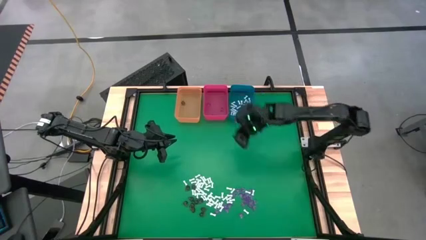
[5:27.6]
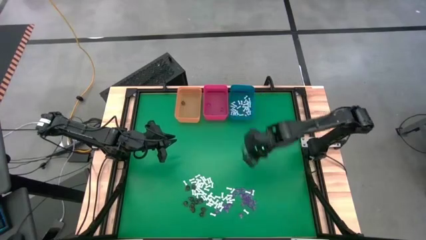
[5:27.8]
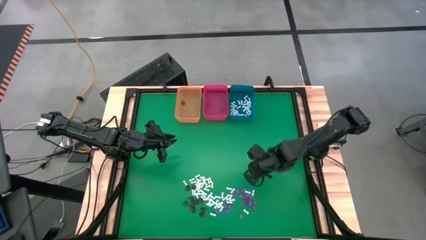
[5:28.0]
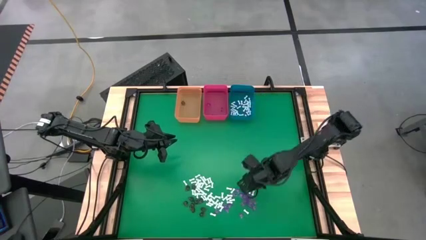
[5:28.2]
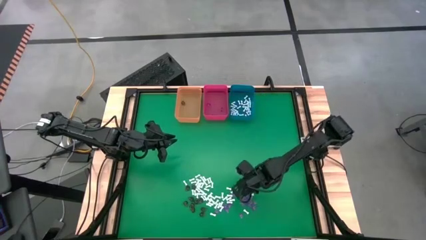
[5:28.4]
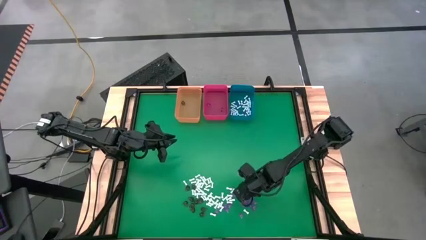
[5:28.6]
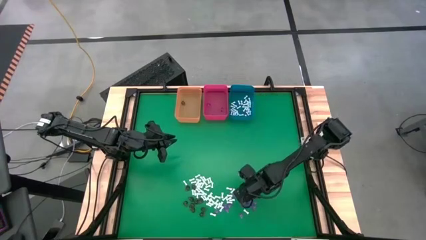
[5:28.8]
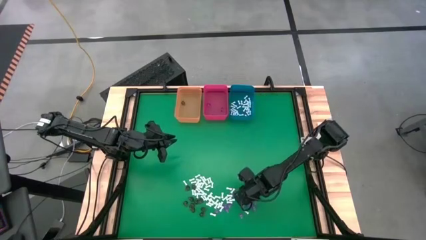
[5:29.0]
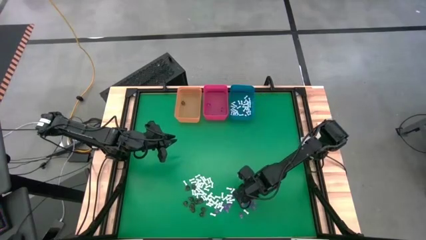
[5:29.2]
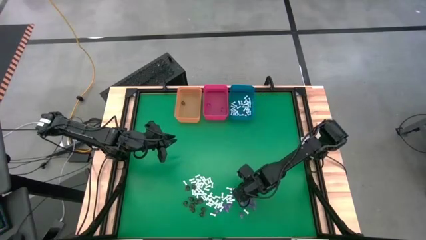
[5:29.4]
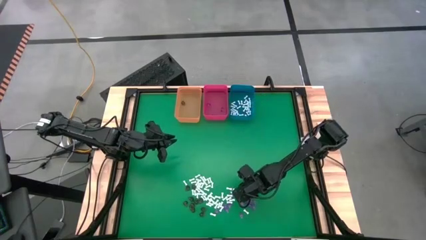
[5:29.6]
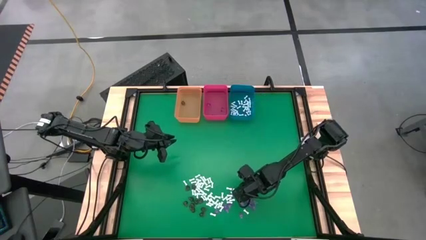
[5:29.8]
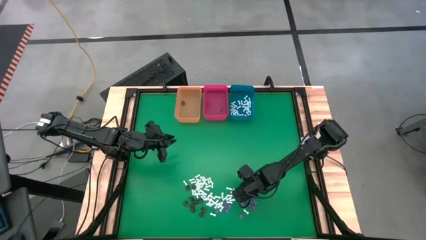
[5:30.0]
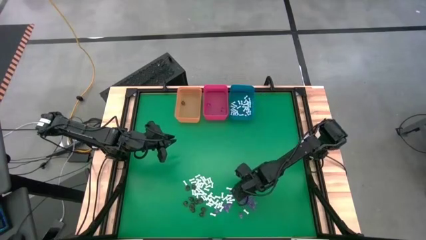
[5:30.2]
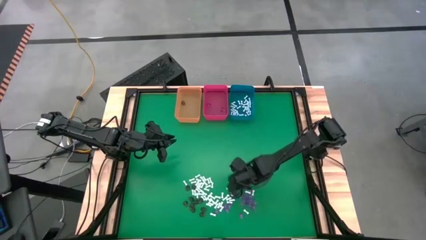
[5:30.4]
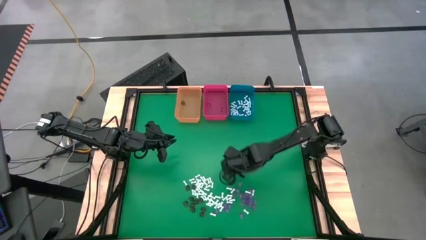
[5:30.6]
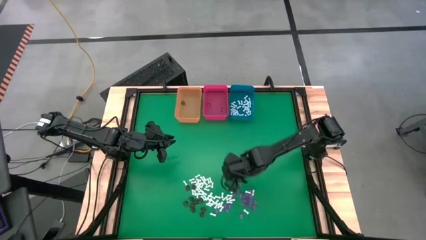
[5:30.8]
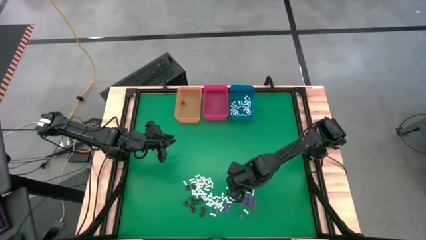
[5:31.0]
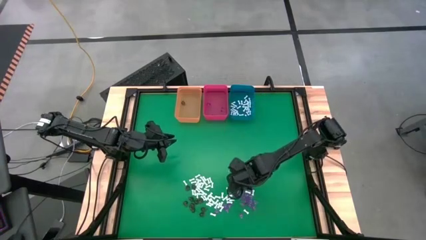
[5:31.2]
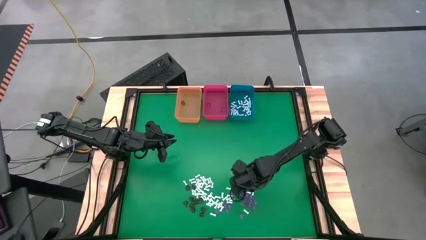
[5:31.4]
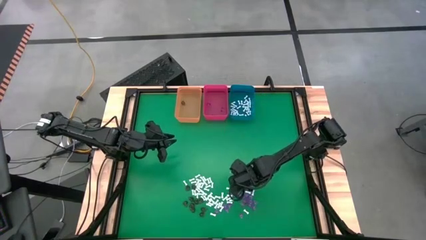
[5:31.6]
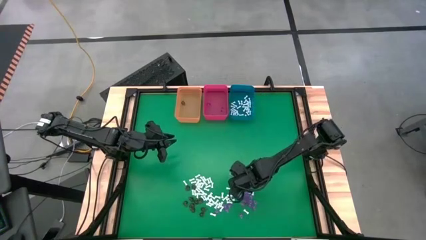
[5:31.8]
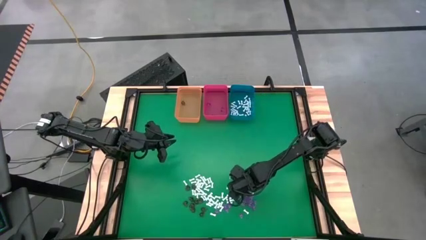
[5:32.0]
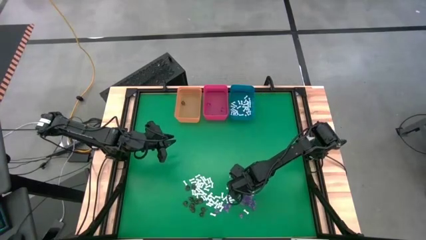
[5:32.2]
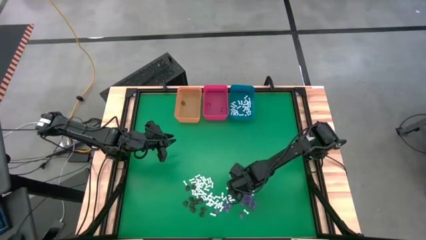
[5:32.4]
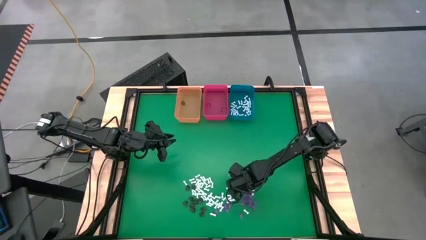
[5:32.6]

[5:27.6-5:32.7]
Task: Sort Halloween decoration
Put the violet witch hat toy into the red bin

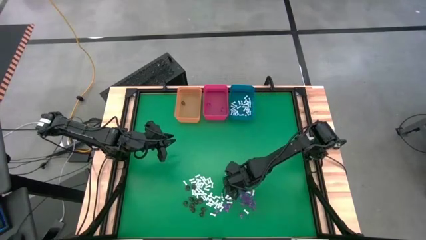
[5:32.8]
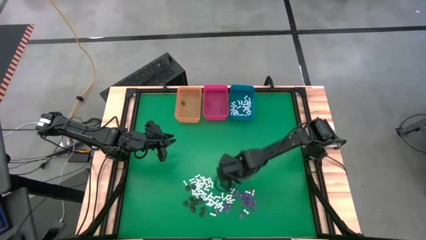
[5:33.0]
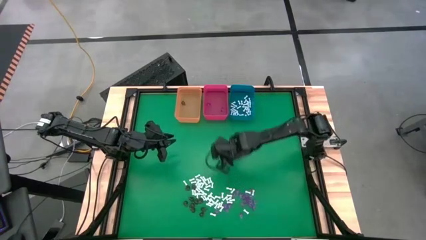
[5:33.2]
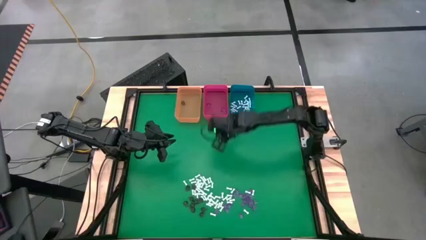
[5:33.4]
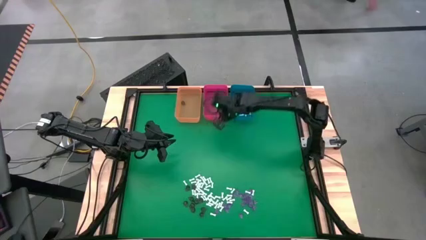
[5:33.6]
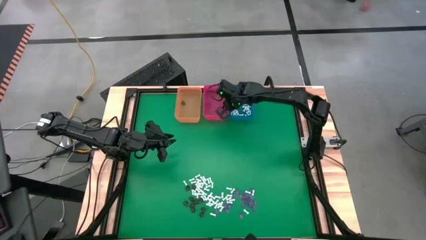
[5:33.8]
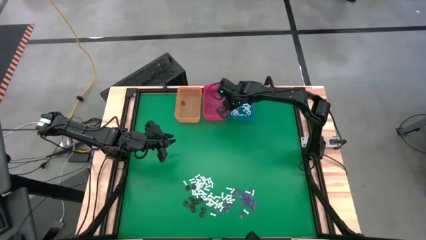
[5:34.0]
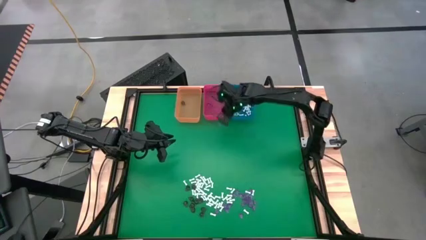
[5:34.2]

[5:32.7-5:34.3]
Put the violet witch hat toy into the red bin

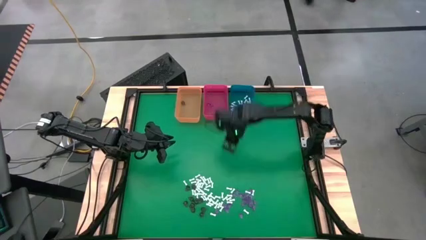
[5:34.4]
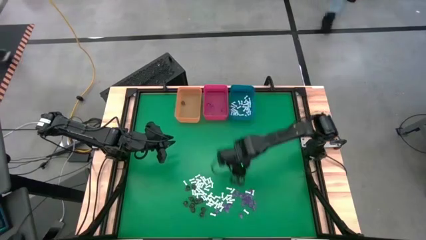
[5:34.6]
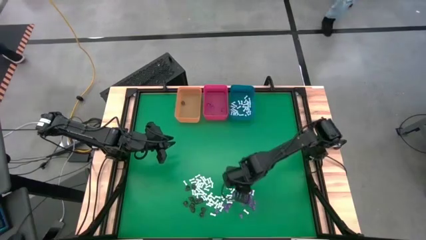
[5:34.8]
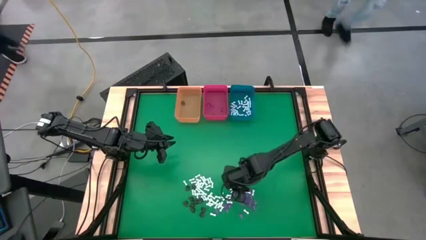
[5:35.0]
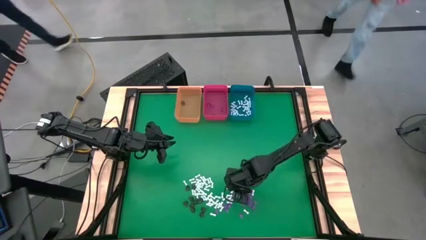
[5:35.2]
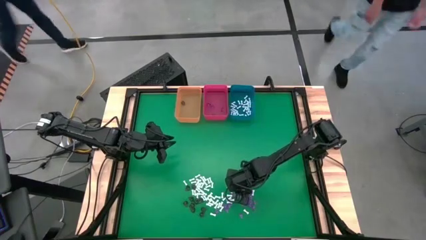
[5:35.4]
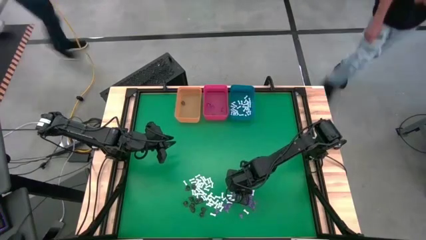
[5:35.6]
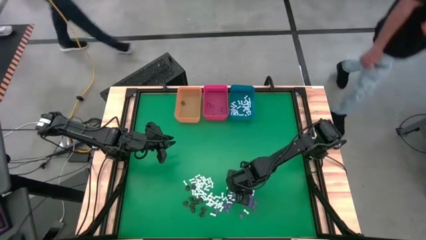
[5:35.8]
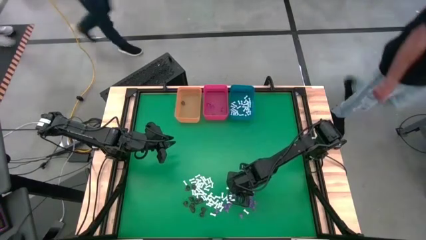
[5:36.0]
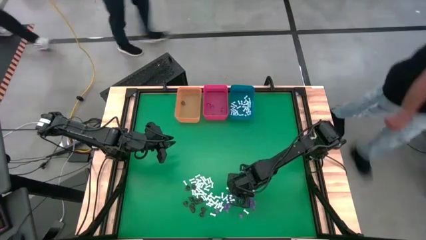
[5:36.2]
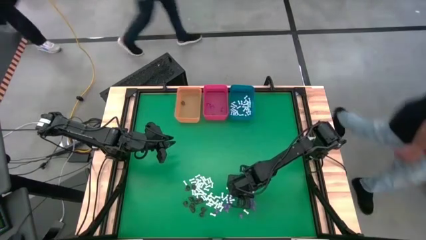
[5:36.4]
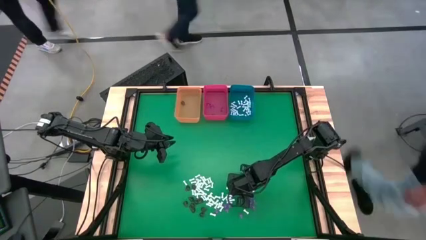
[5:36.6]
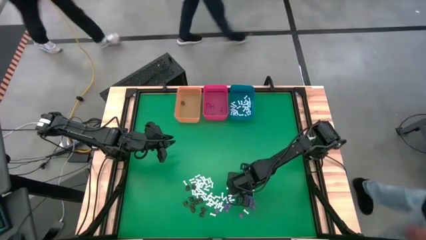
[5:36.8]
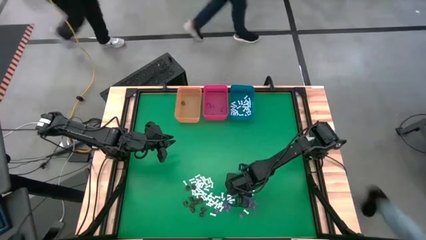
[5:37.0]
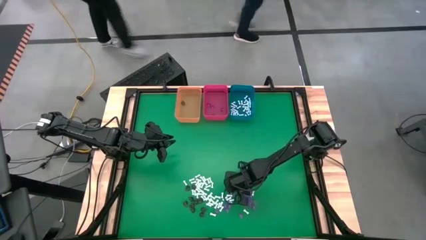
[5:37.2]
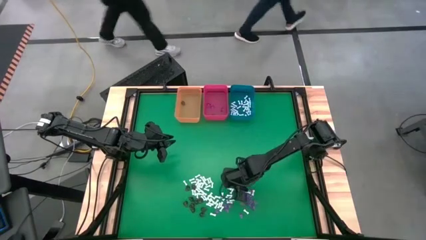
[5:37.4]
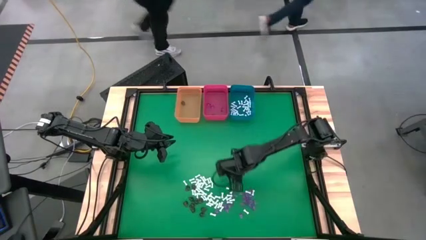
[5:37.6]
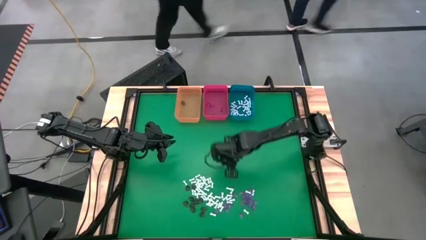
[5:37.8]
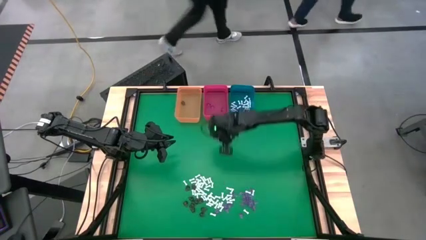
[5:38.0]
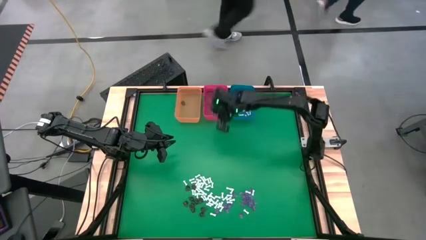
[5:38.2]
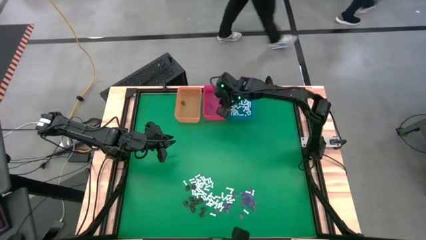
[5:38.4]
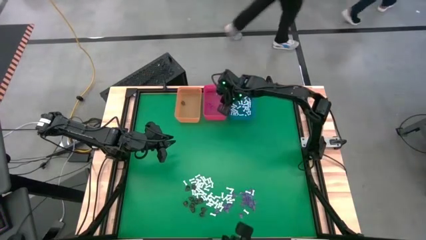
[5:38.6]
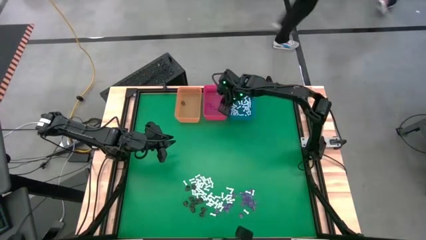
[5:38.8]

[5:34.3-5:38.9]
Put the violet witch hat toy into the red bin

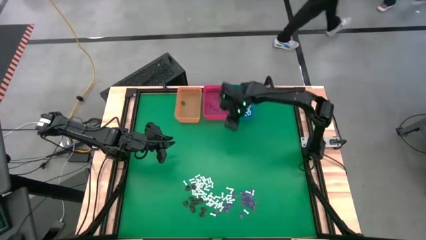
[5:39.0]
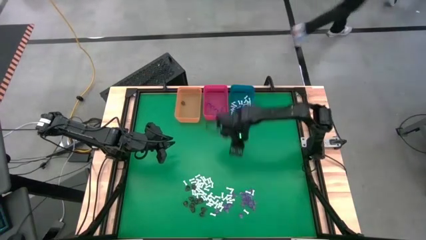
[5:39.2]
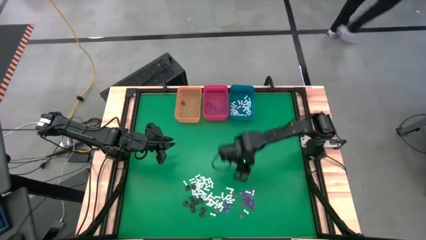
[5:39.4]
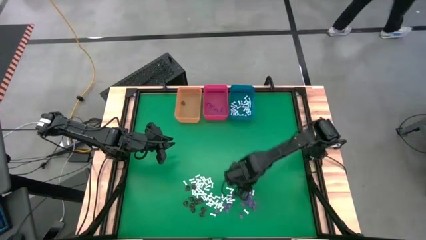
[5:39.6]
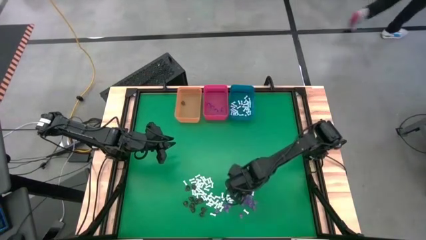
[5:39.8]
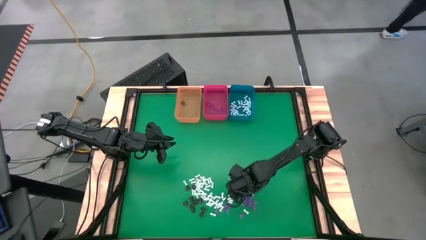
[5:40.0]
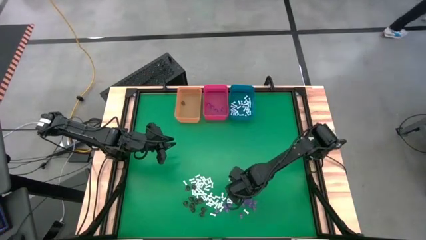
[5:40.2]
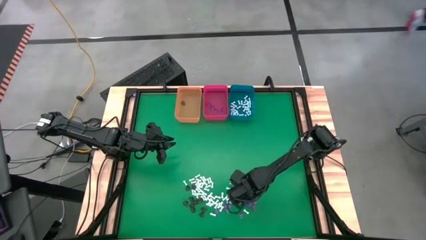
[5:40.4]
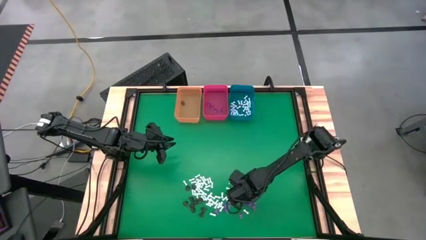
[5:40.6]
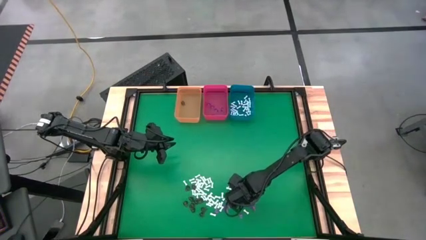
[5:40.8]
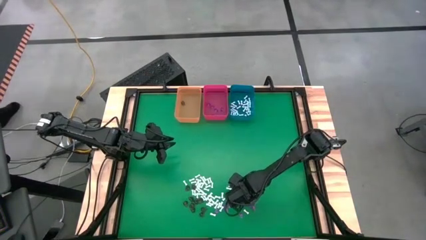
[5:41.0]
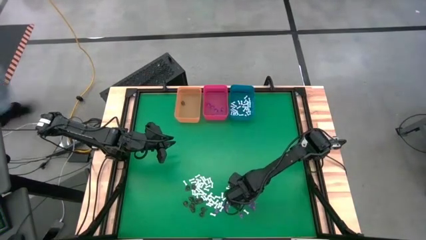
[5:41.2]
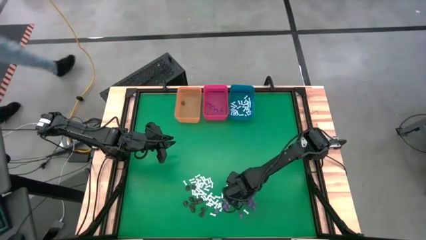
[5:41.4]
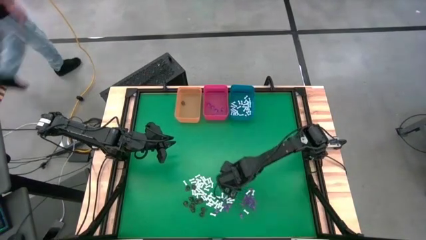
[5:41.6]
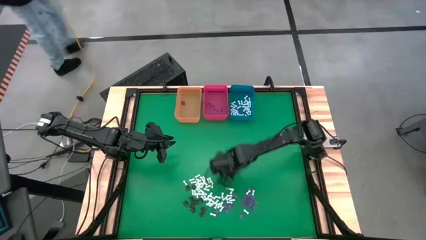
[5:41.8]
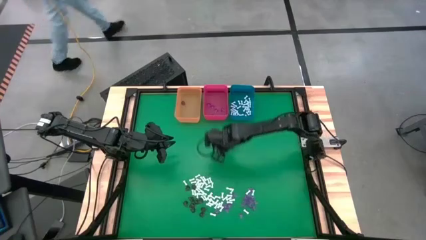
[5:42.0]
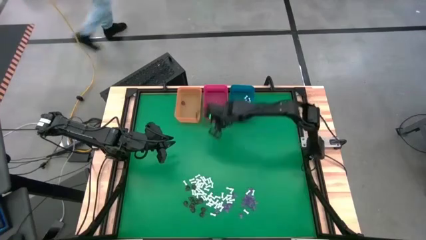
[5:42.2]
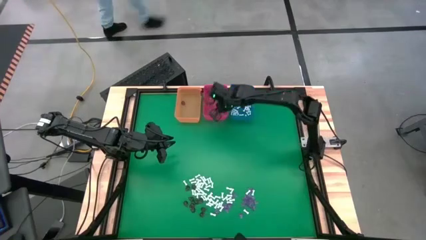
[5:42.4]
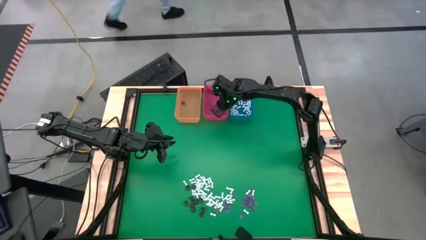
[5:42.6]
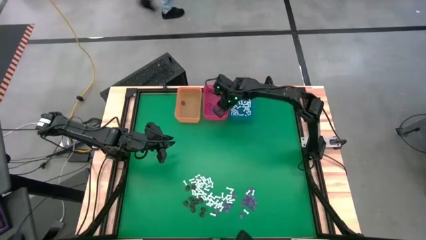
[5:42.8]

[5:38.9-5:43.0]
Put the violet witch hat toy into the red bin

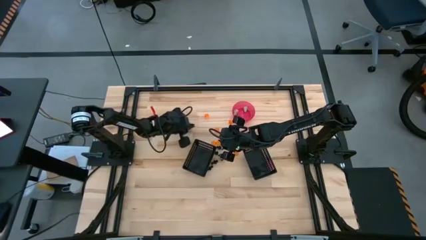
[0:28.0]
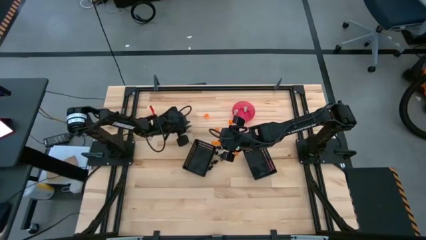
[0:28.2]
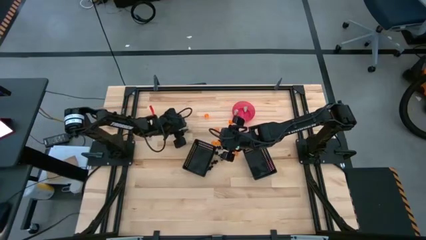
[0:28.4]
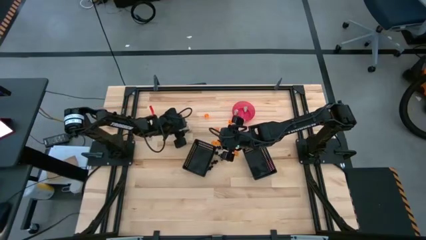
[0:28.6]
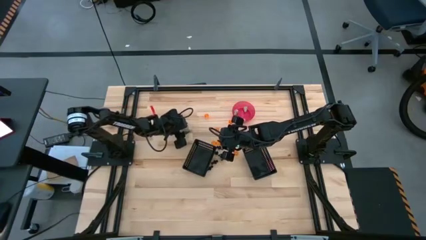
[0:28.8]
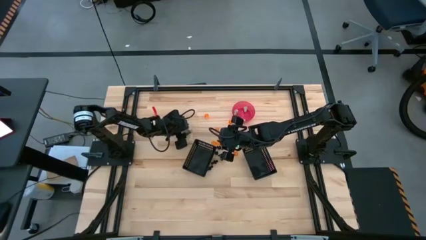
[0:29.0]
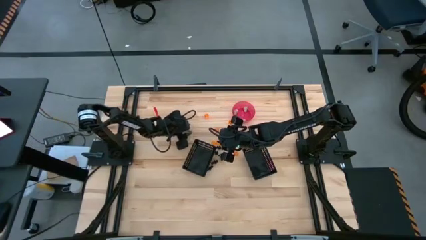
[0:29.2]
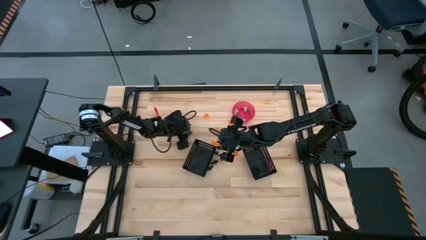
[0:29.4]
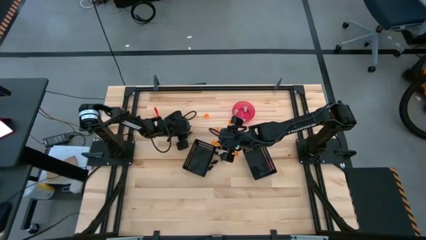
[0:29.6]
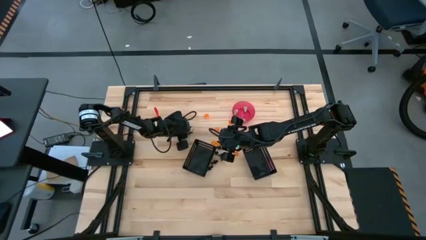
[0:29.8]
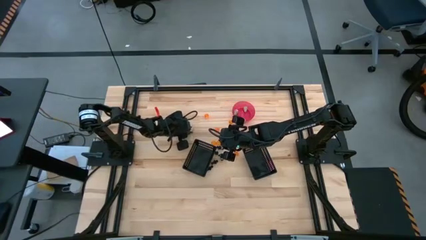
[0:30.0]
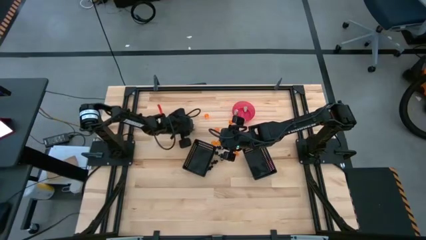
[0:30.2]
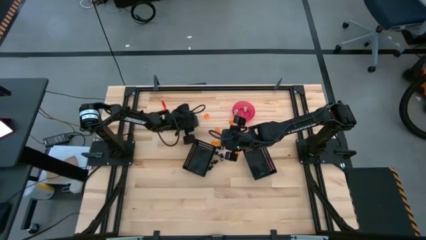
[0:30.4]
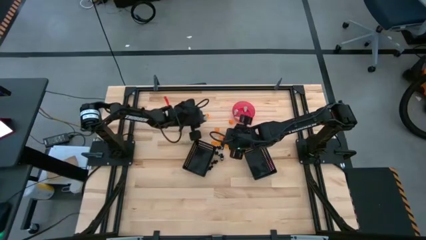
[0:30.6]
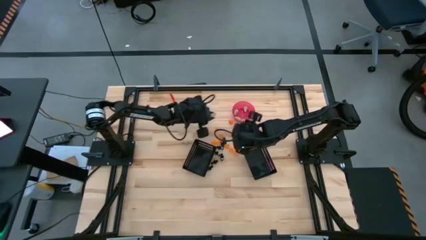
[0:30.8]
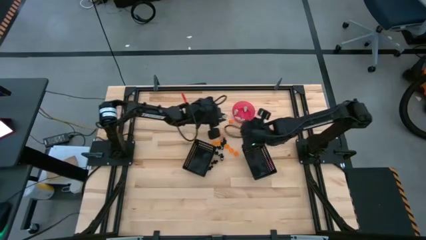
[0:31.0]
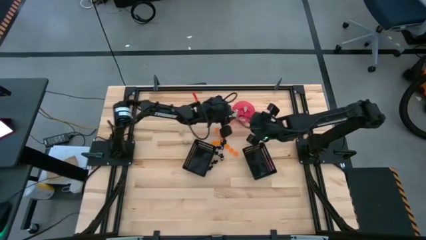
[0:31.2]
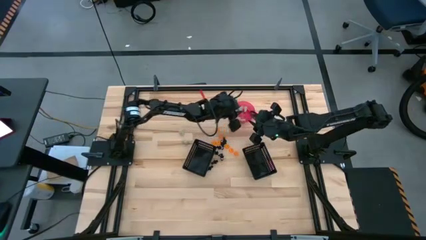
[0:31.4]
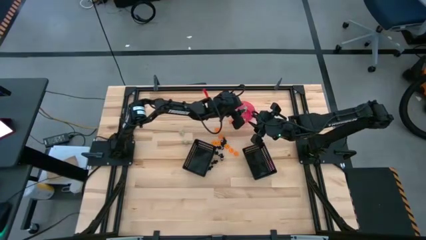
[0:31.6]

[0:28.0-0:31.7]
Task: Sort Halloween decoration
Put the white skull toy into the pink container
